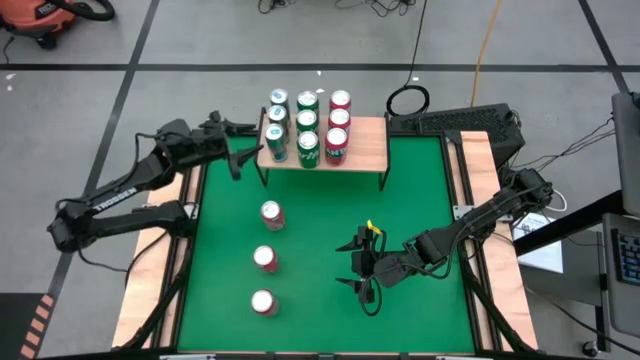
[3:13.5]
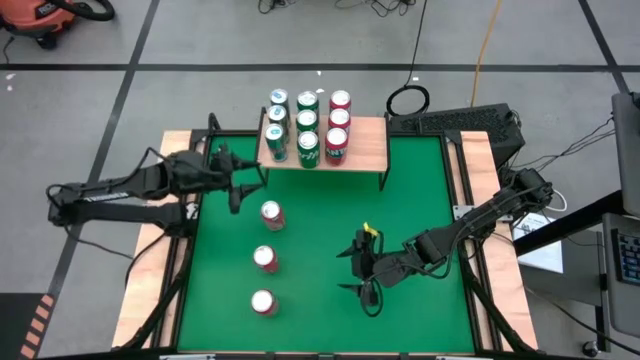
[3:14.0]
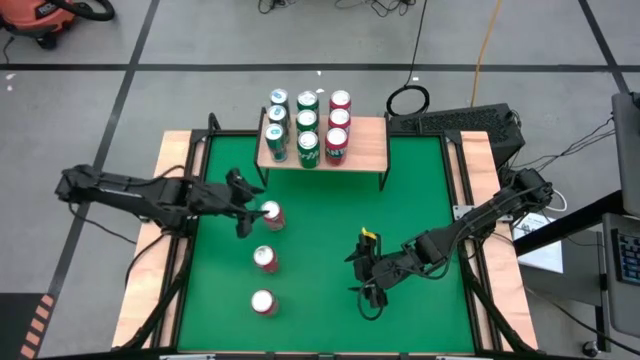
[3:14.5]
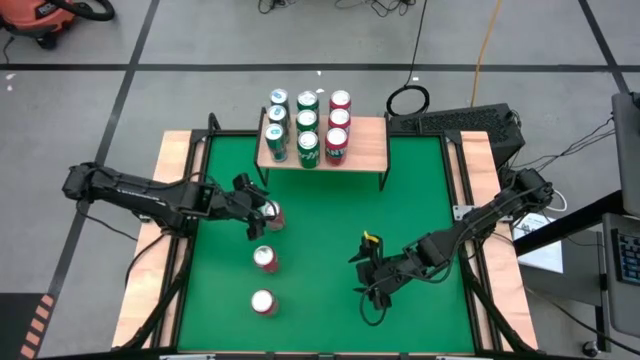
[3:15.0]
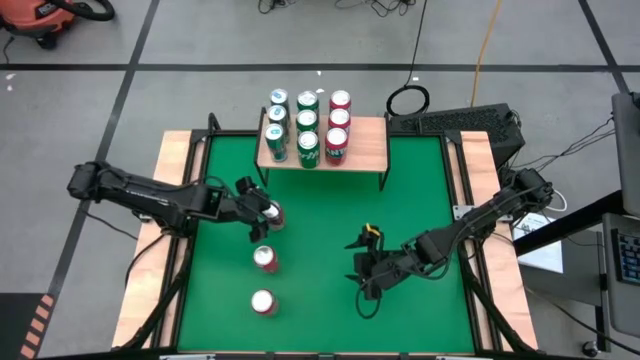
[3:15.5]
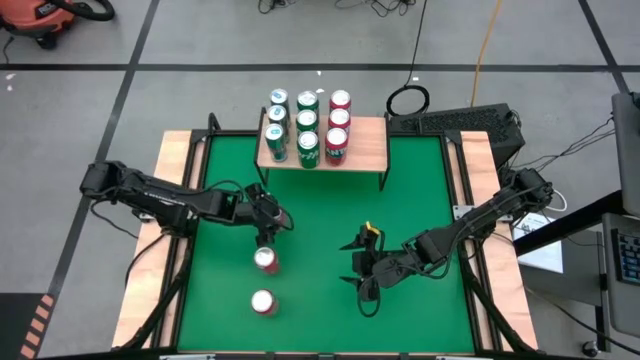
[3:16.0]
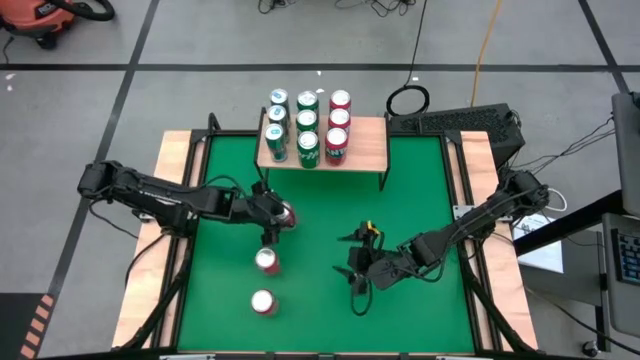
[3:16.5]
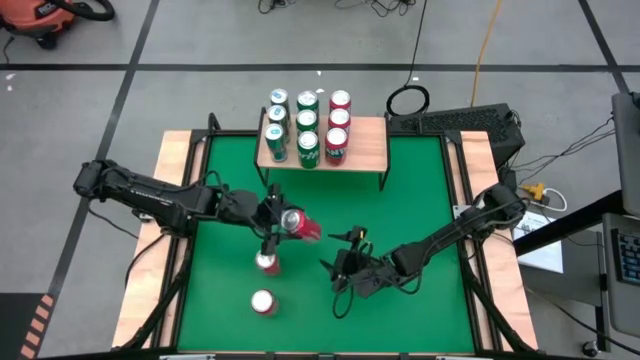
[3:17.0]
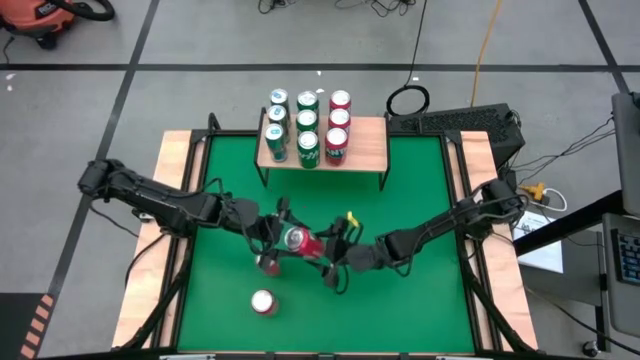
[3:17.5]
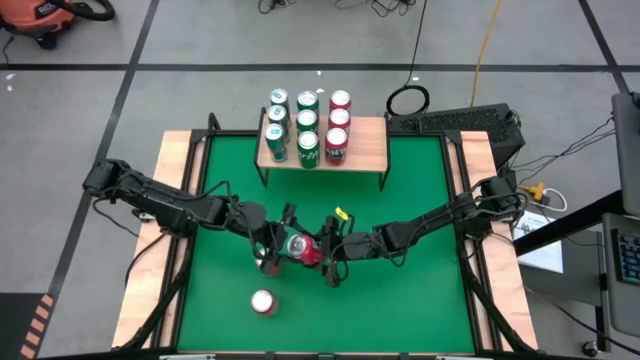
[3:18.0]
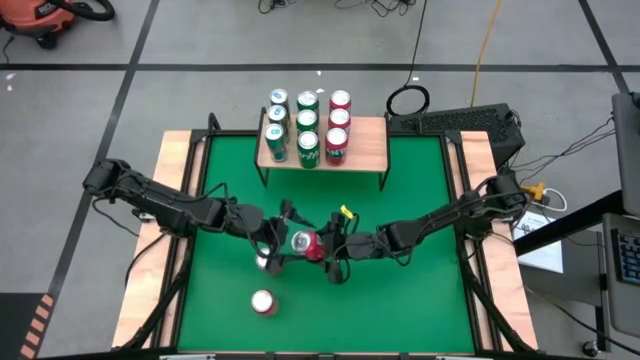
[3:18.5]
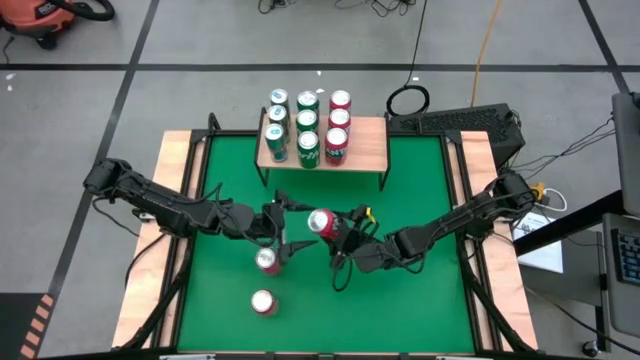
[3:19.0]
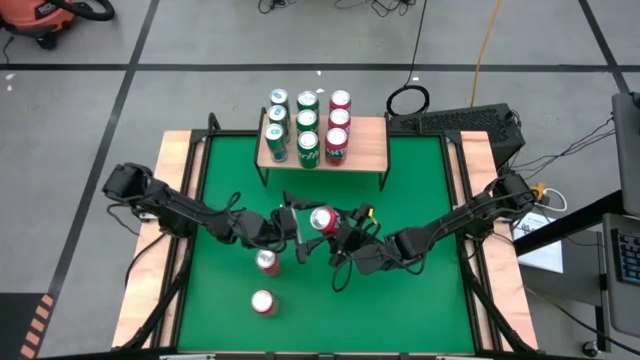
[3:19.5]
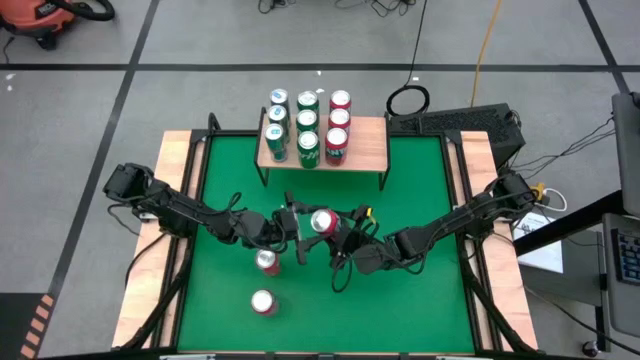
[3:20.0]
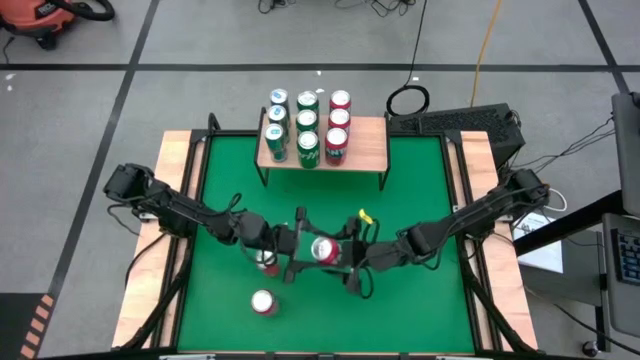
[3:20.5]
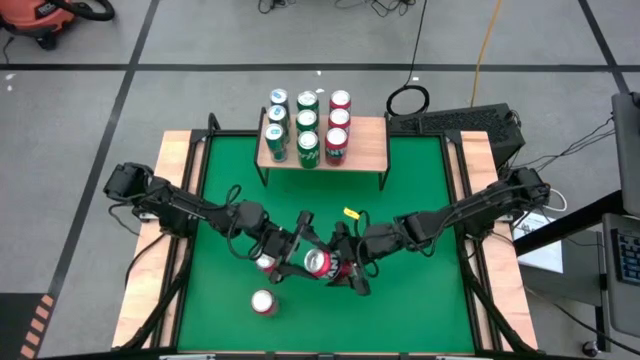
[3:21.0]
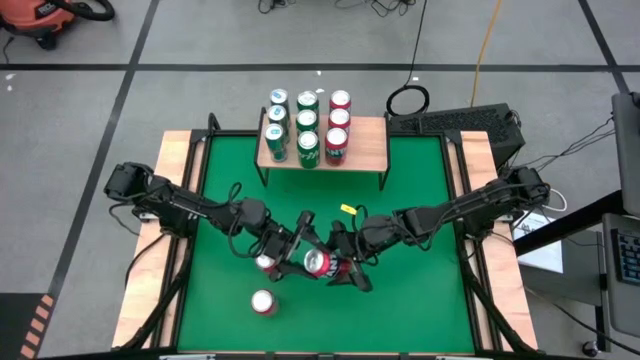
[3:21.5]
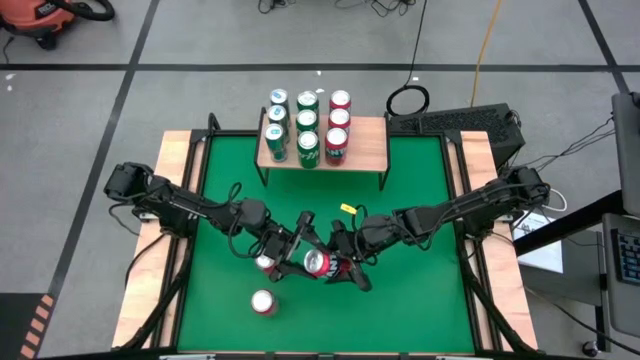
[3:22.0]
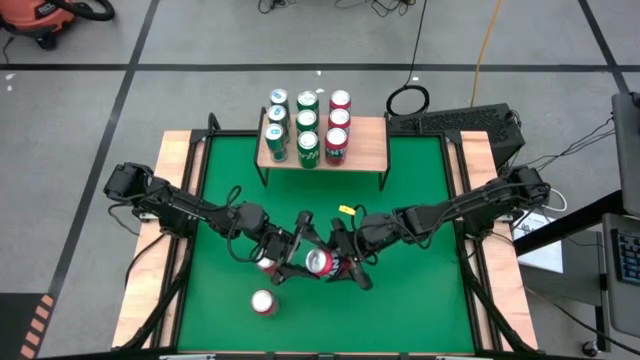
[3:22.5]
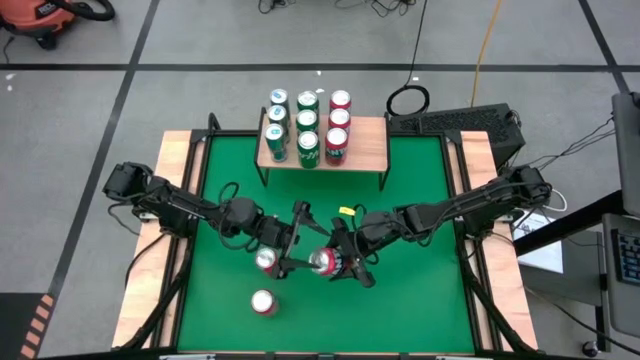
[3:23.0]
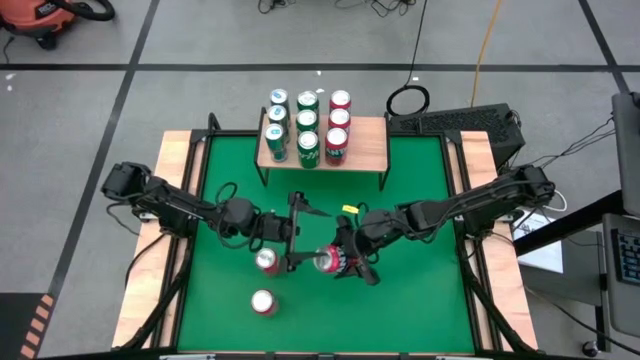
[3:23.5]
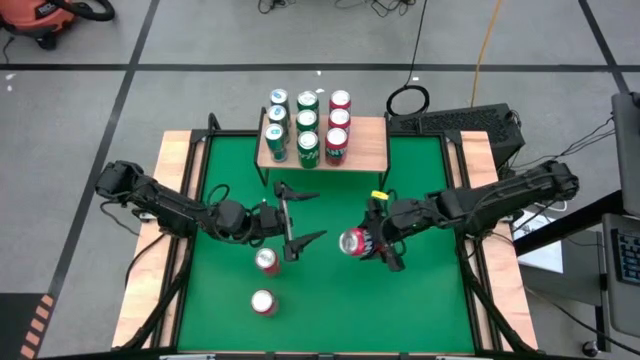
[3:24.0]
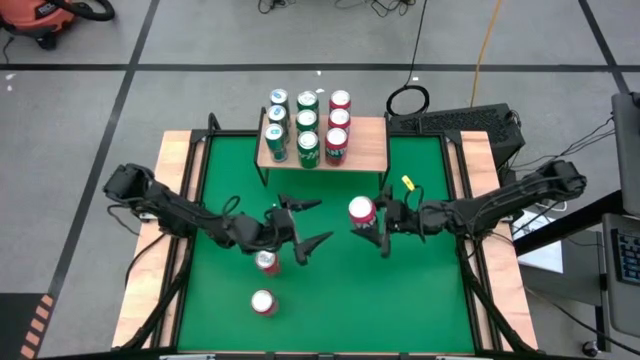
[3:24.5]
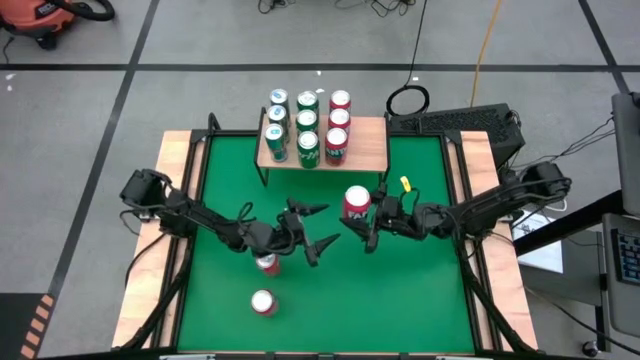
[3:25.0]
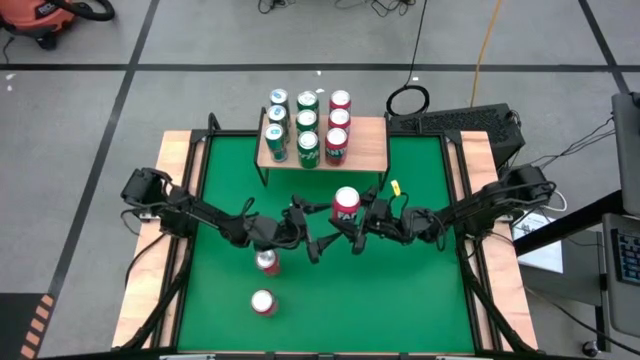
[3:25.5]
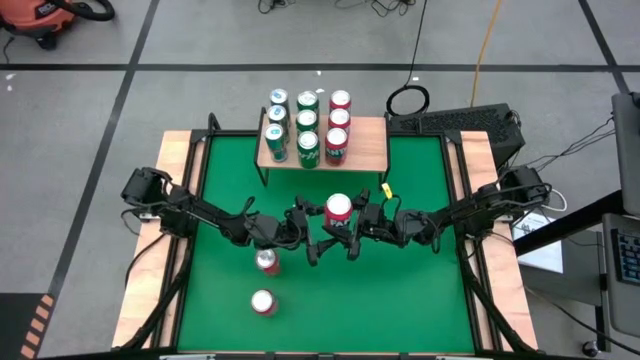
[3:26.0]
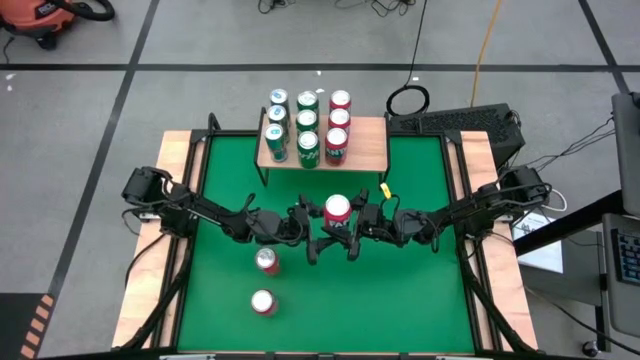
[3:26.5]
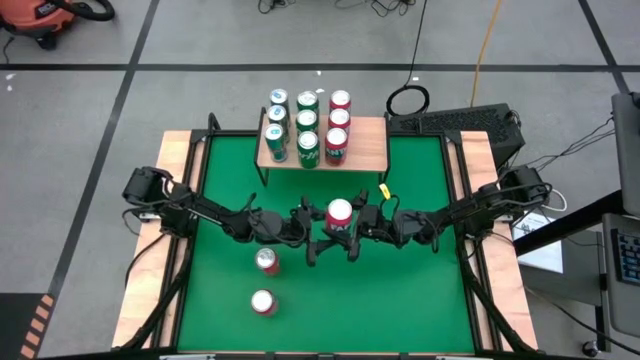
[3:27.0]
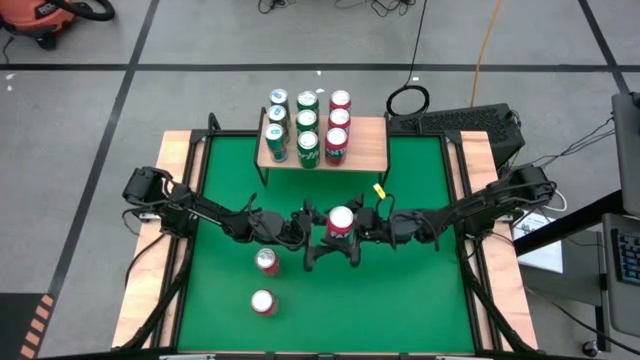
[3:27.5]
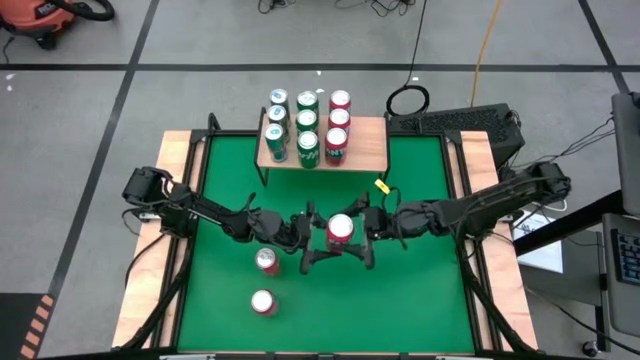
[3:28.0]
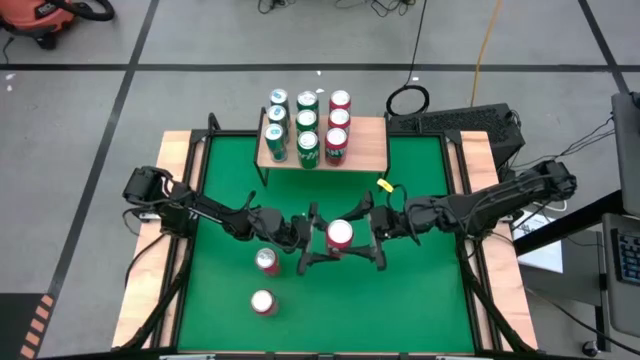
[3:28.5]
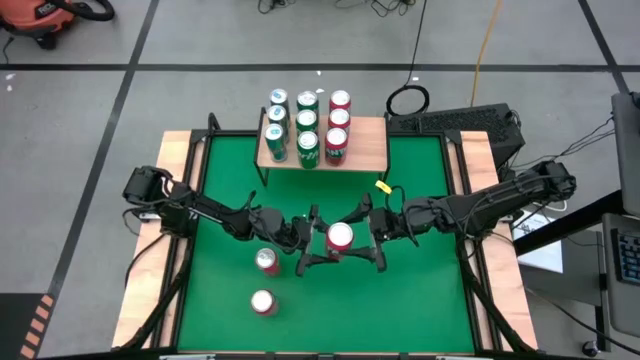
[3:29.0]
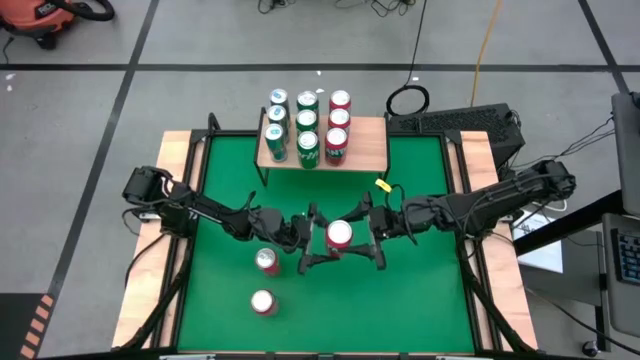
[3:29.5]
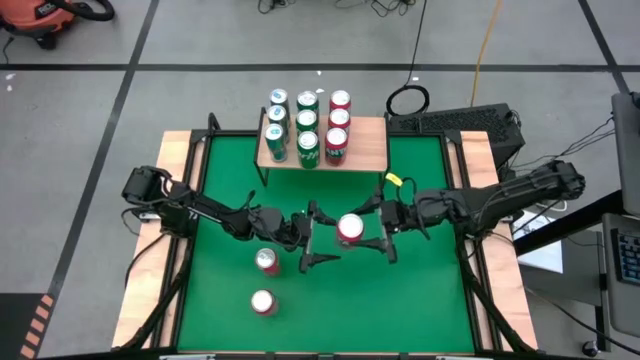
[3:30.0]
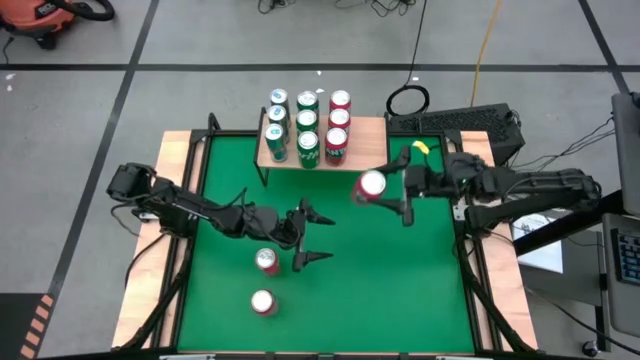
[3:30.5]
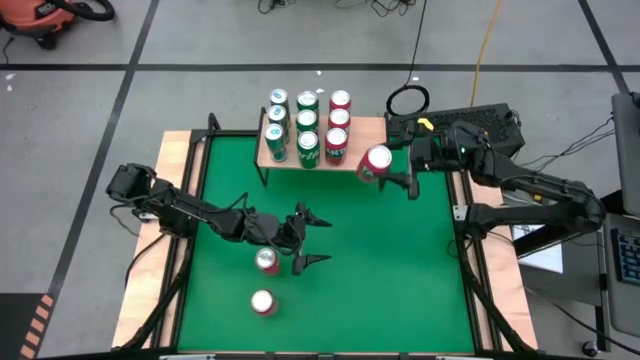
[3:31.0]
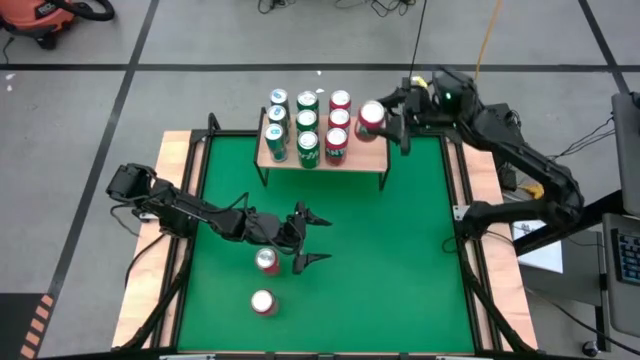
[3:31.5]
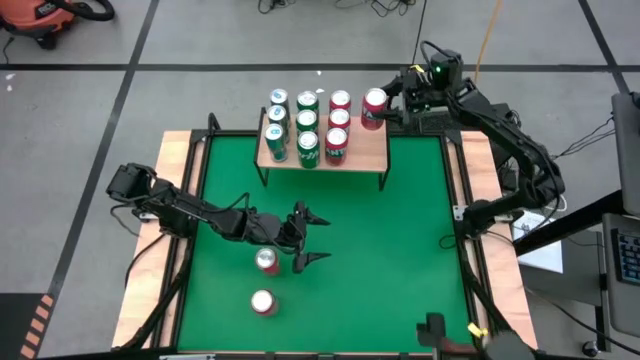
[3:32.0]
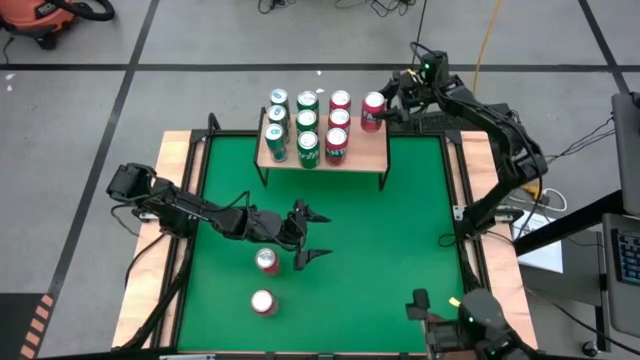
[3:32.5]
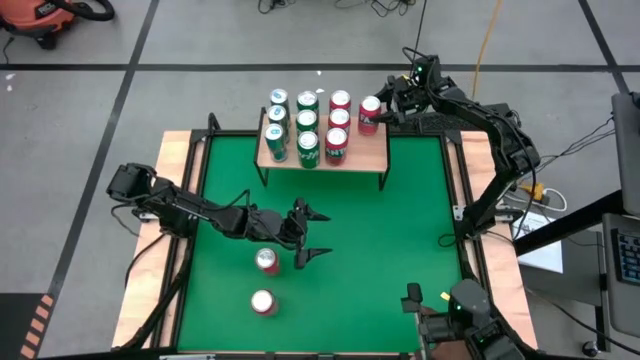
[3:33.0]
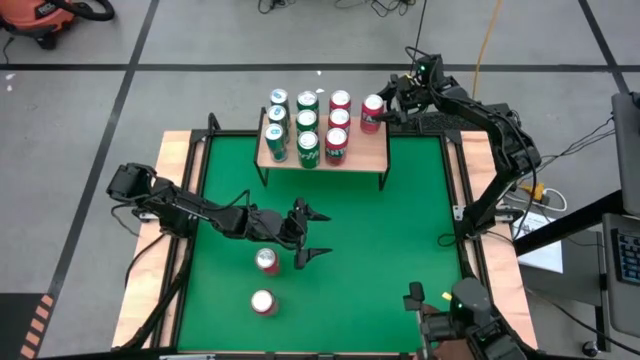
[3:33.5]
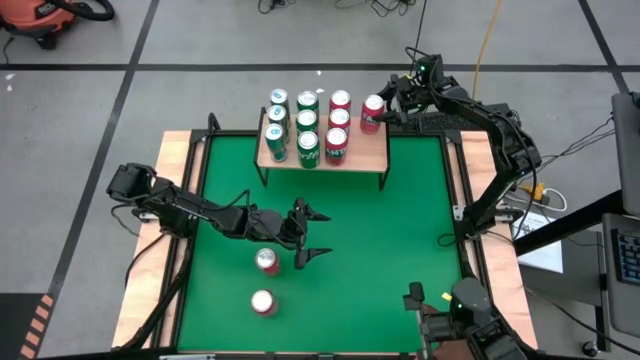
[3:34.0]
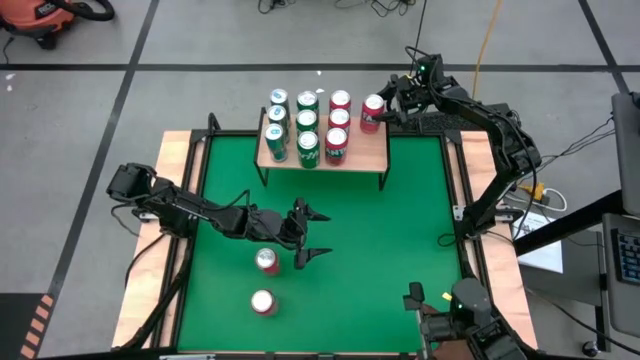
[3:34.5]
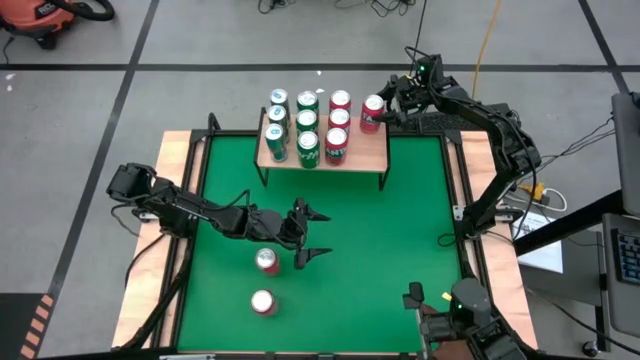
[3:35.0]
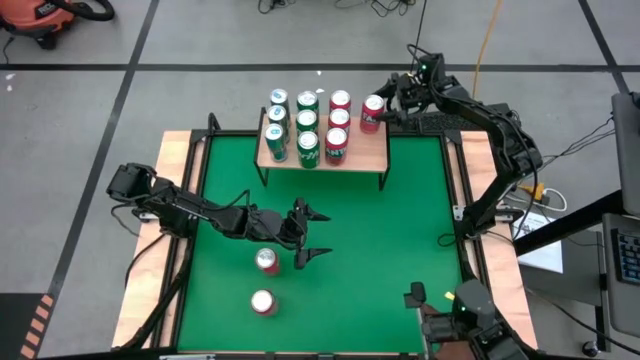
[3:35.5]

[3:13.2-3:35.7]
Task: Place canned beverage on shelf
Put the orange soda can on the shelf
